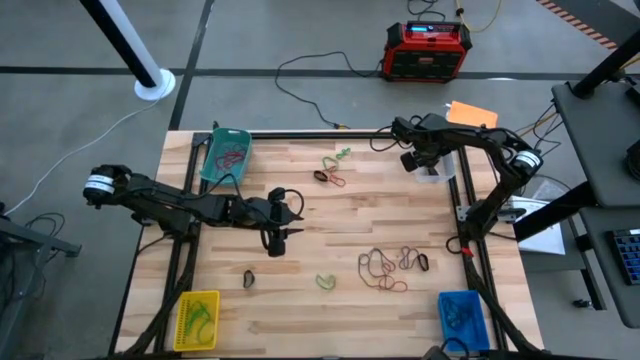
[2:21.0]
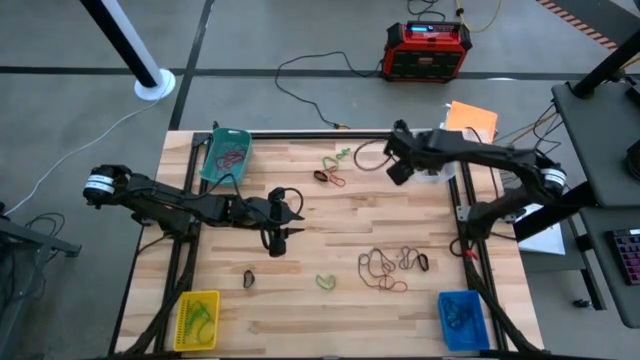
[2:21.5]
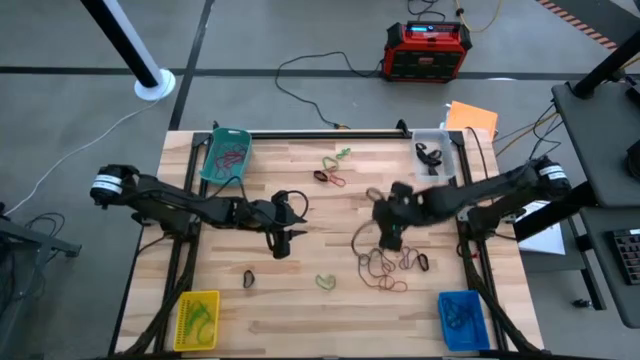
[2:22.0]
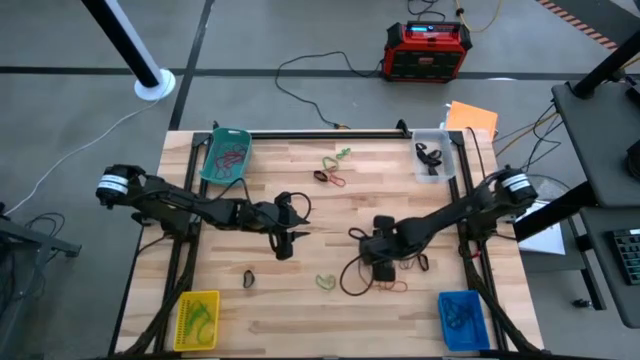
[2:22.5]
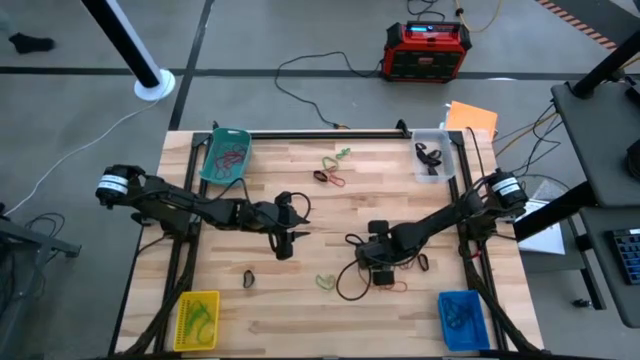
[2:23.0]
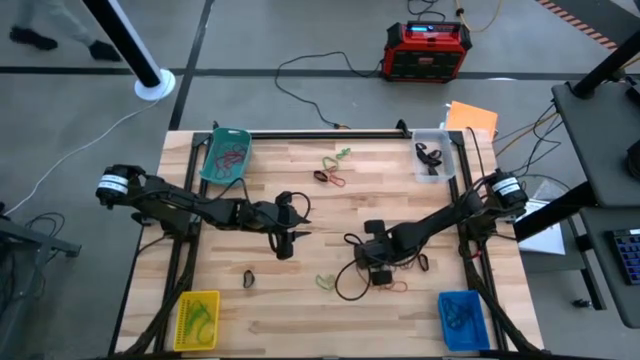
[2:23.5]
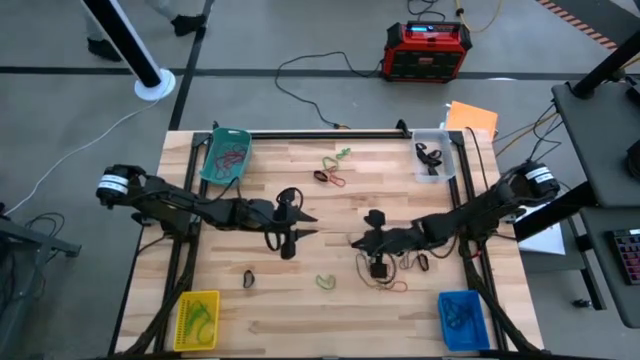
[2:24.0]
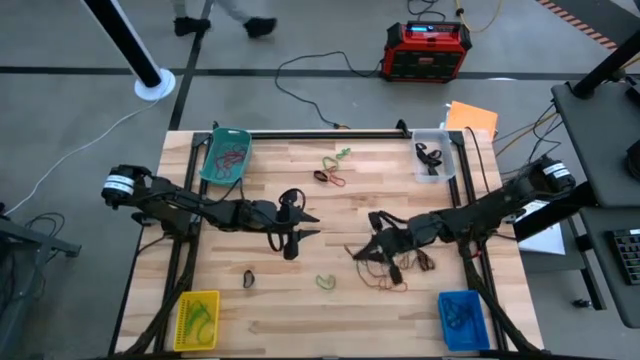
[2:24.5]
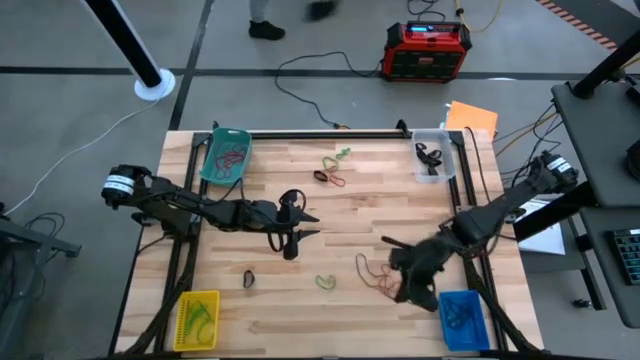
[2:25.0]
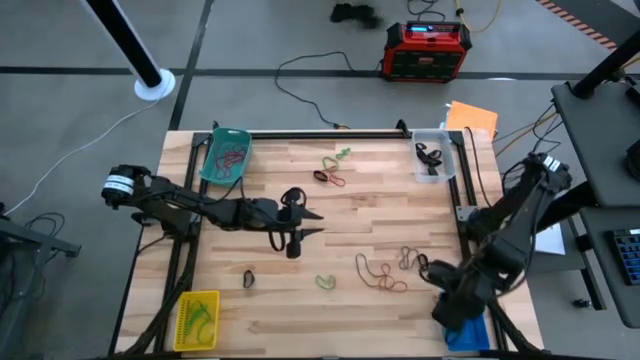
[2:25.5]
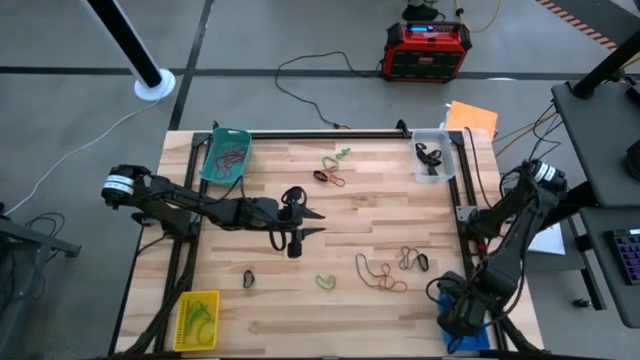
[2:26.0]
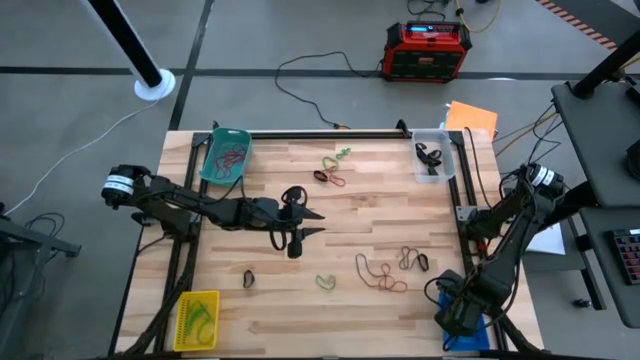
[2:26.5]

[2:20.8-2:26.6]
Task: Sort rubber bands into baskets
Put the violet rubber band into the blue bin

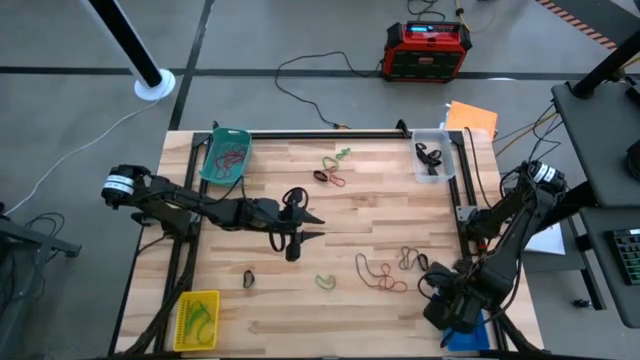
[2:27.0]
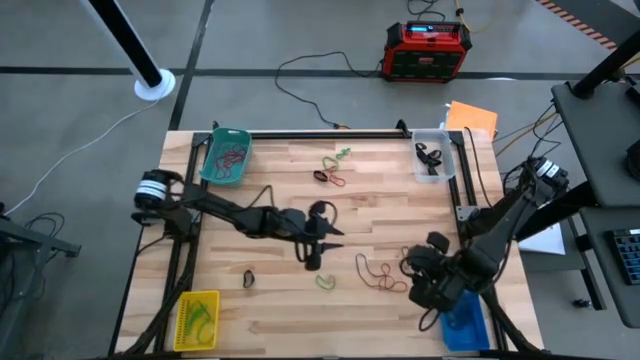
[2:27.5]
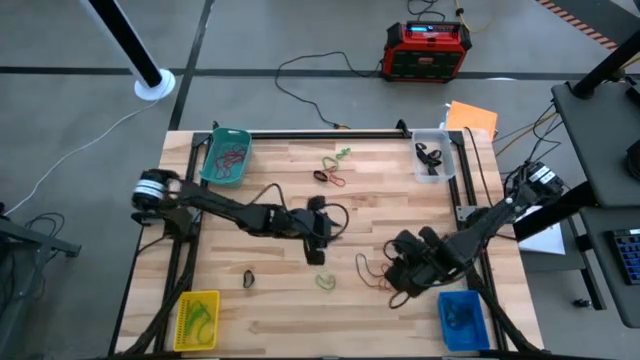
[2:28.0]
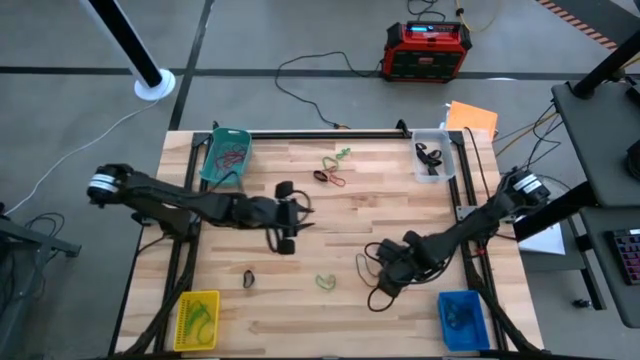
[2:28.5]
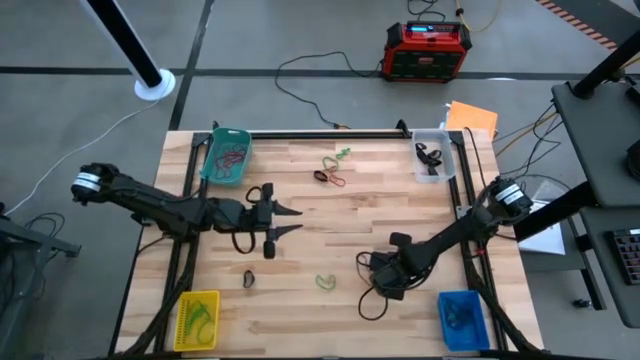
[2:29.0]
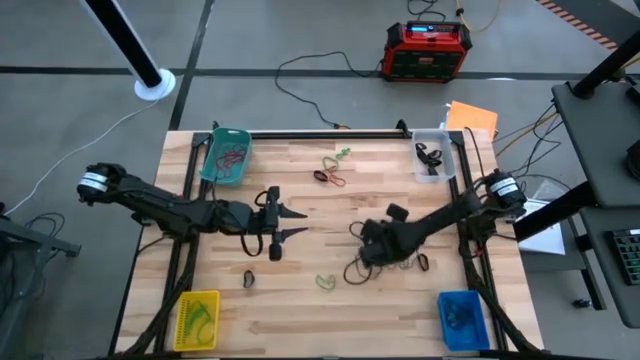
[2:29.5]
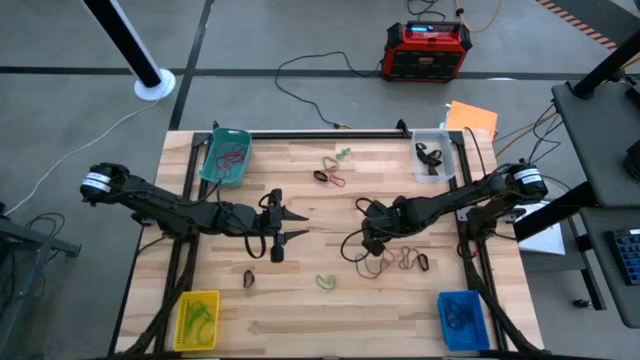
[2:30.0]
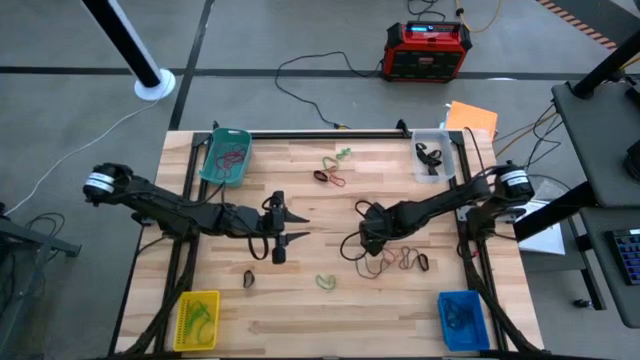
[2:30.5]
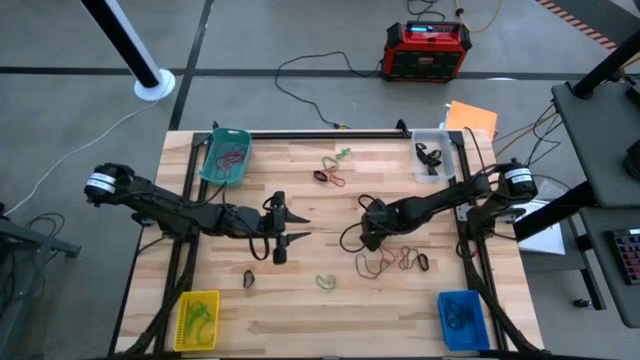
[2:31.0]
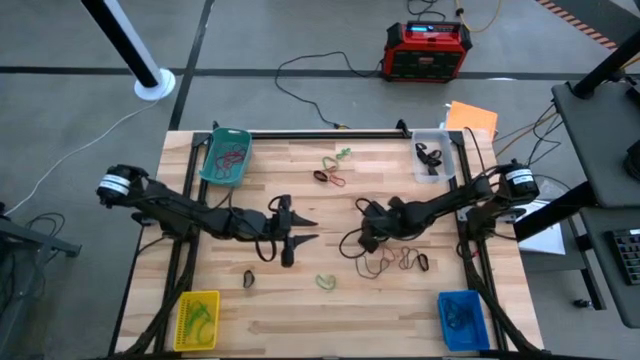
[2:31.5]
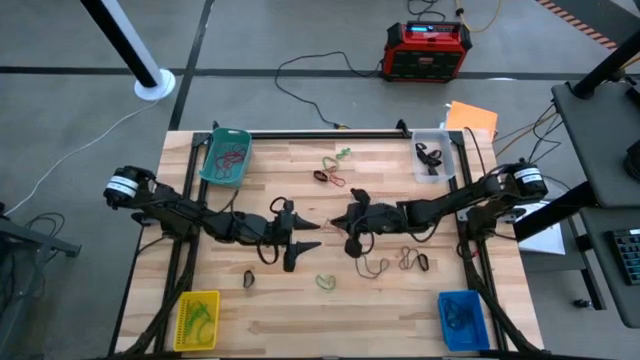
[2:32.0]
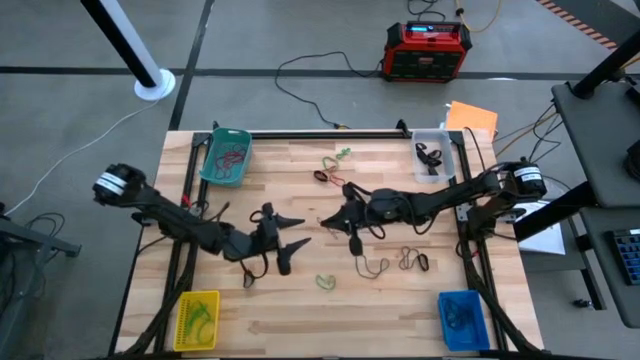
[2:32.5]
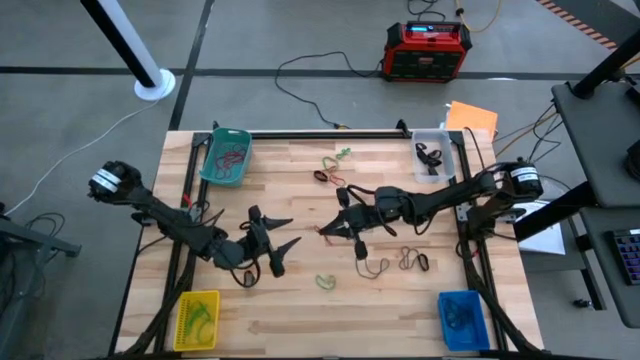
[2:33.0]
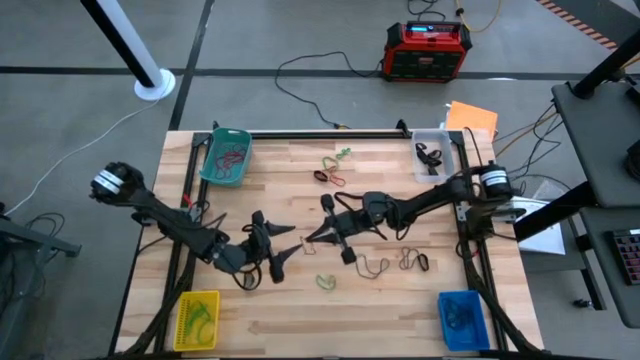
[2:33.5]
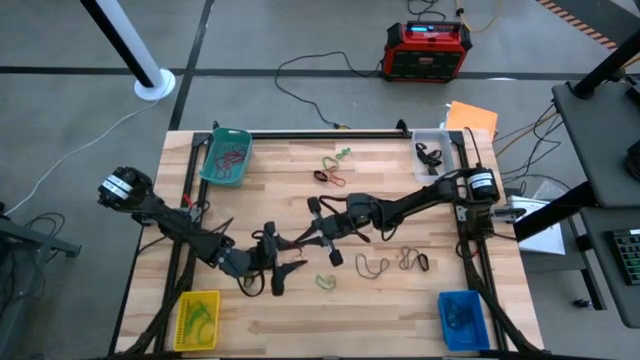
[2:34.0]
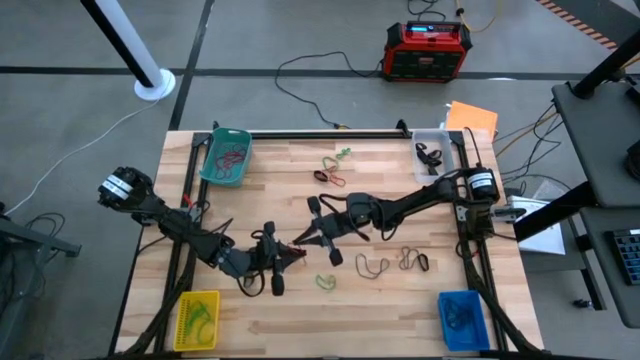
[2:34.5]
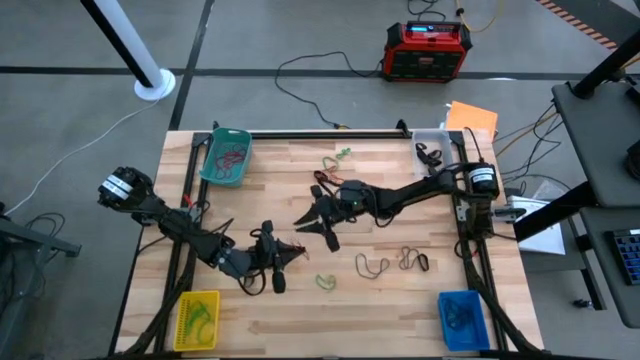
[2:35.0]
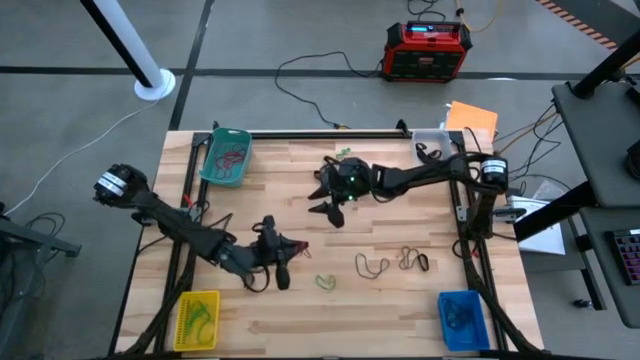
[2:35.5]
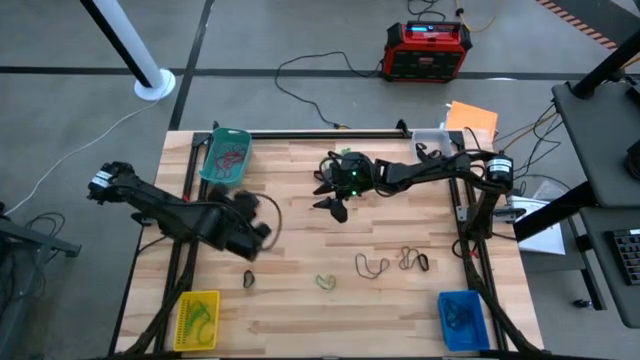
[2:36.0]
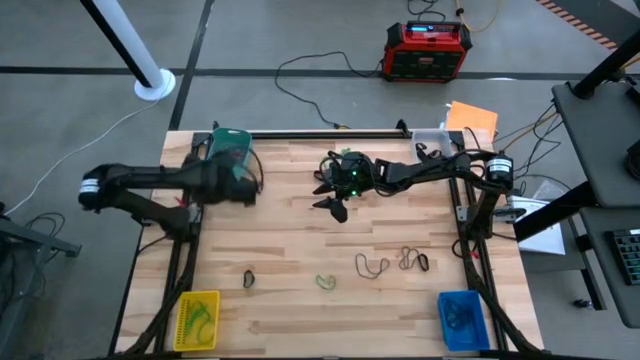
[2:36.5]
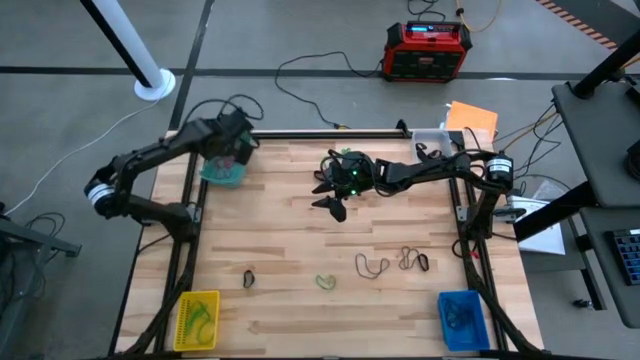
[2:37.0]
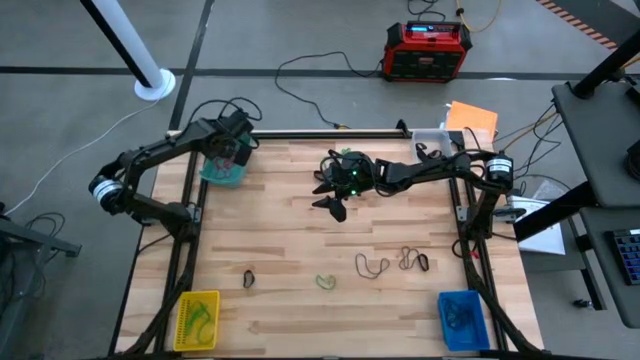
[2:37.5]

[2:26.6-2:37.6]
Put the red rubber band into the green bin
